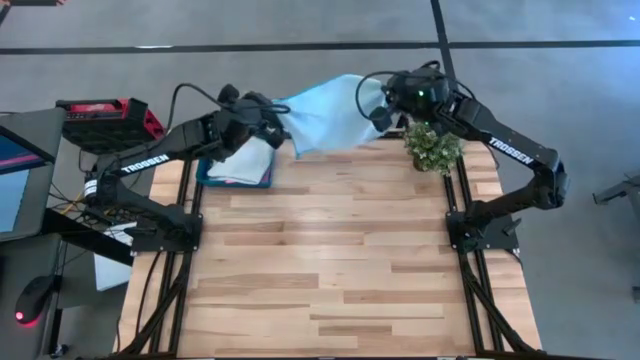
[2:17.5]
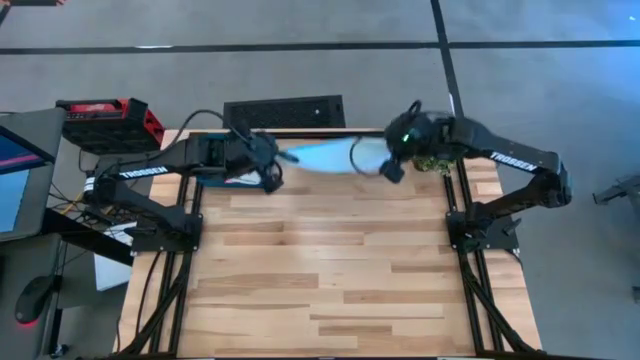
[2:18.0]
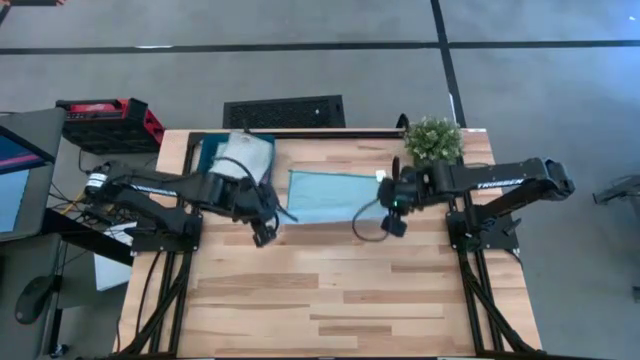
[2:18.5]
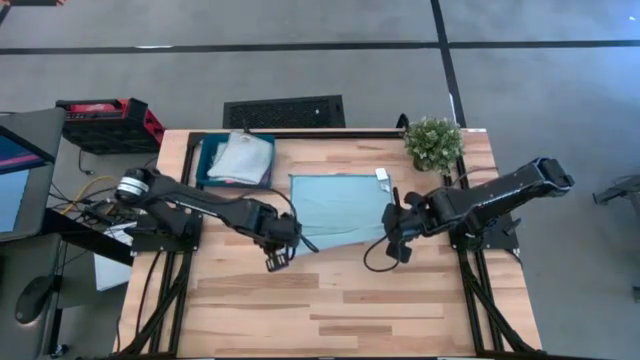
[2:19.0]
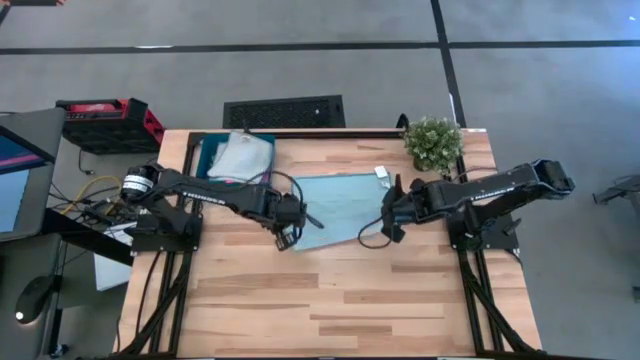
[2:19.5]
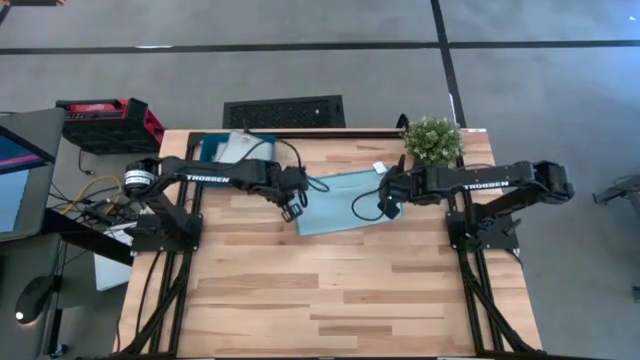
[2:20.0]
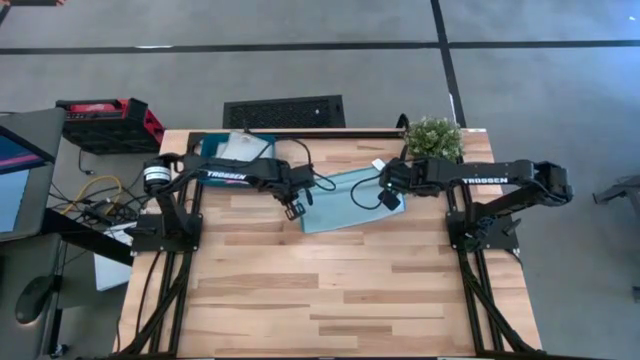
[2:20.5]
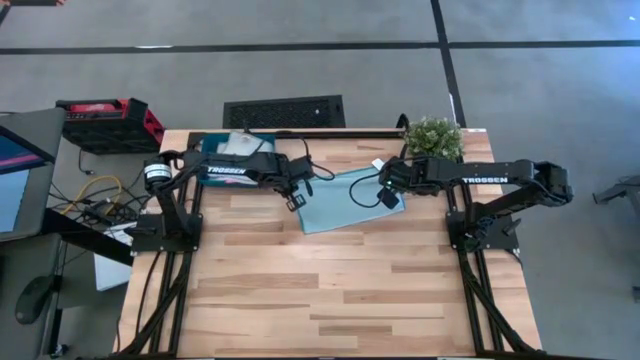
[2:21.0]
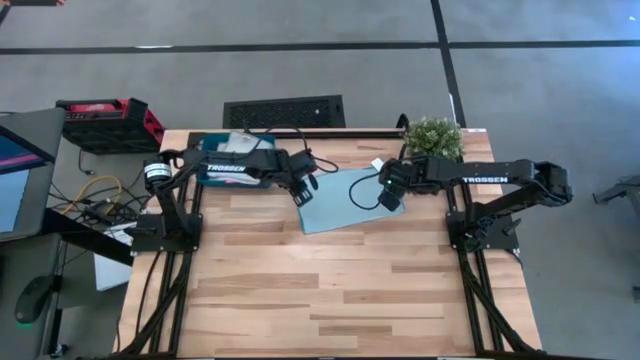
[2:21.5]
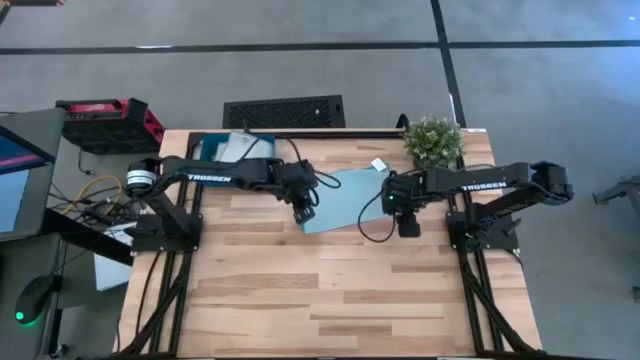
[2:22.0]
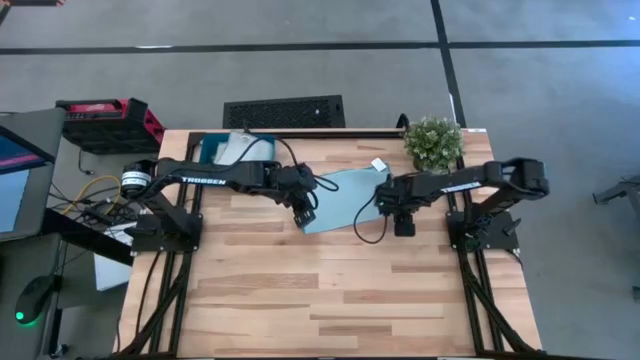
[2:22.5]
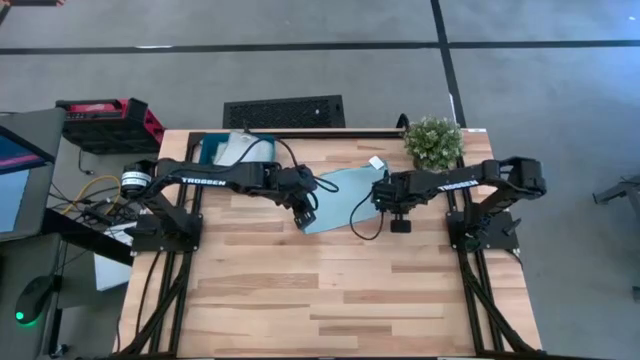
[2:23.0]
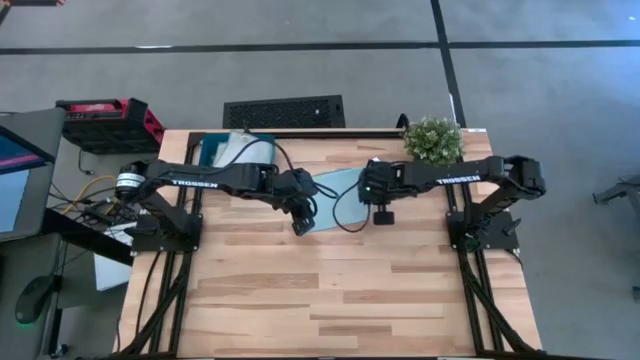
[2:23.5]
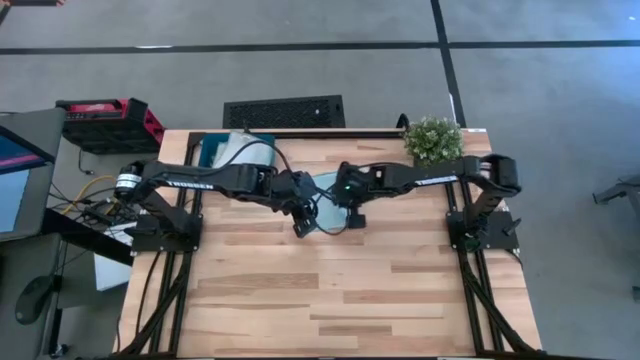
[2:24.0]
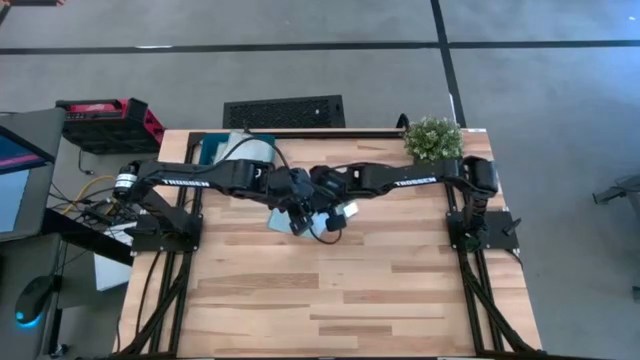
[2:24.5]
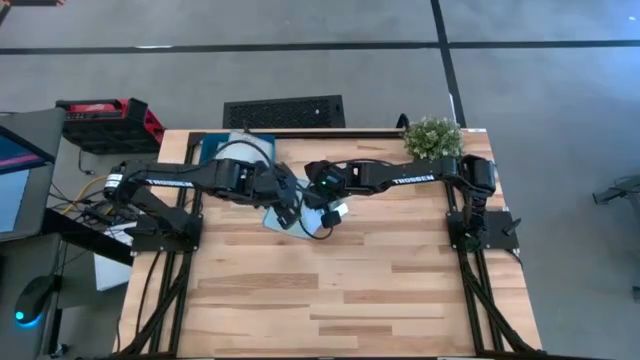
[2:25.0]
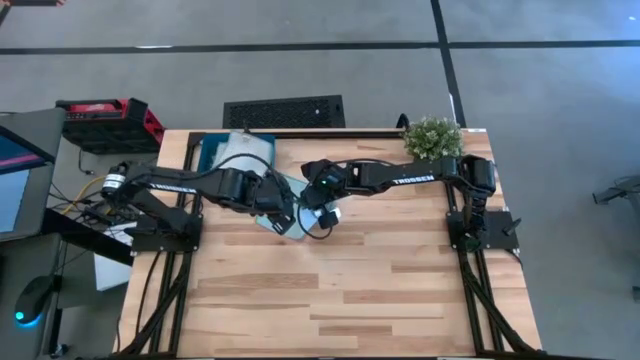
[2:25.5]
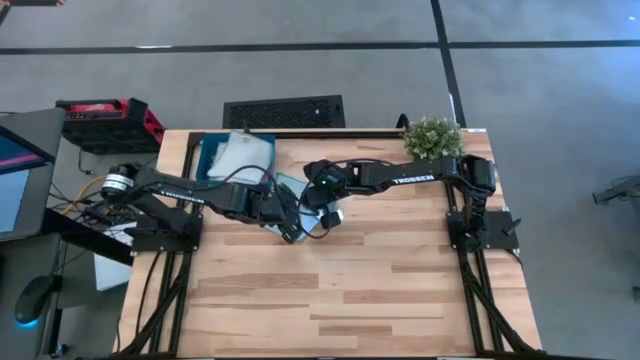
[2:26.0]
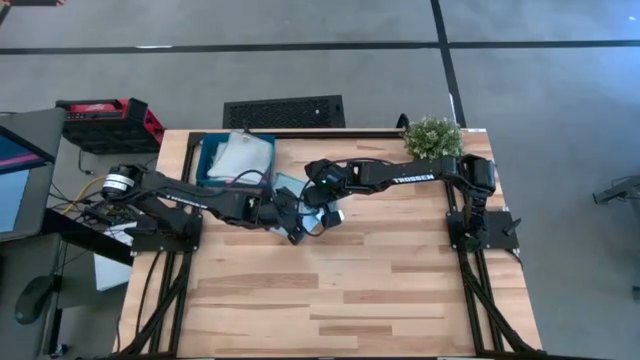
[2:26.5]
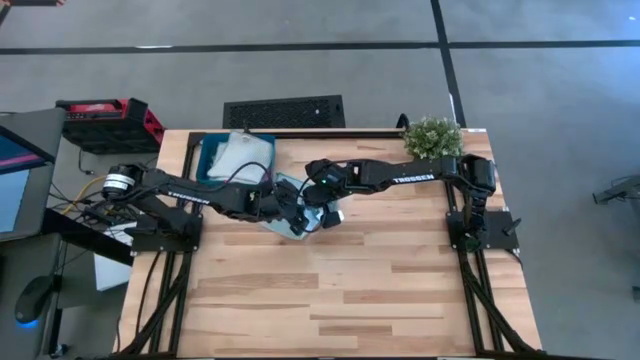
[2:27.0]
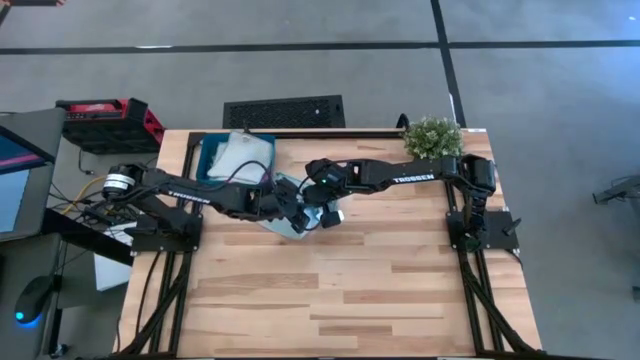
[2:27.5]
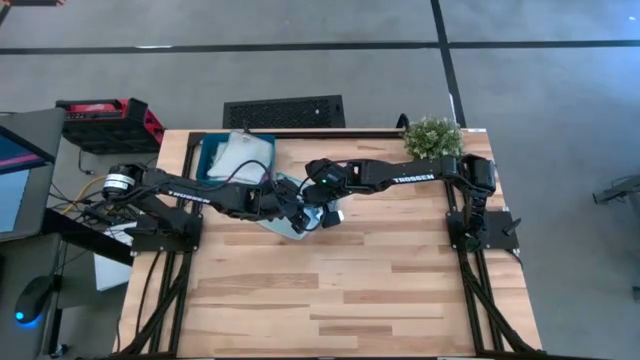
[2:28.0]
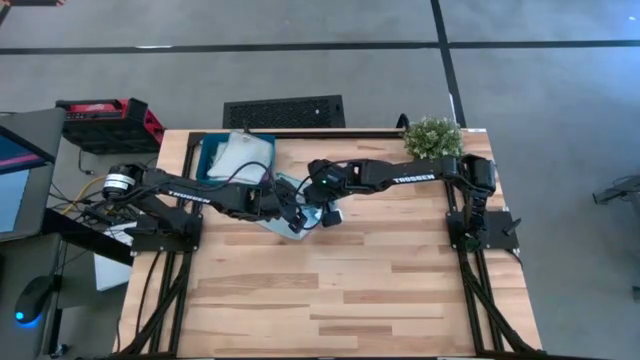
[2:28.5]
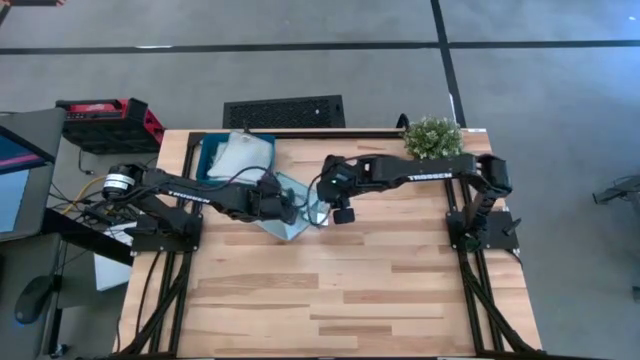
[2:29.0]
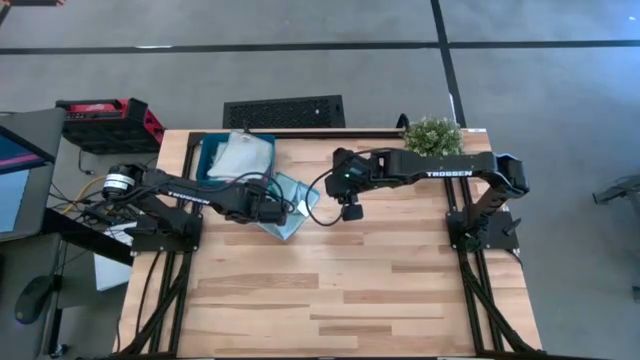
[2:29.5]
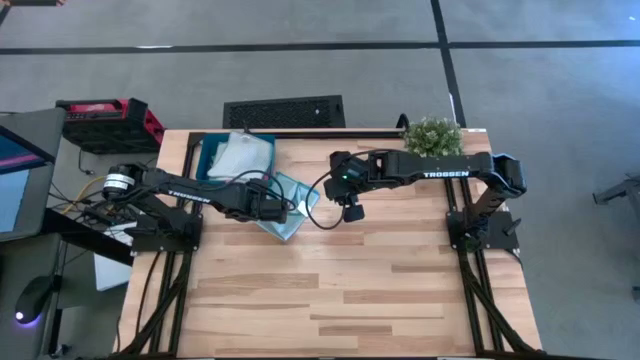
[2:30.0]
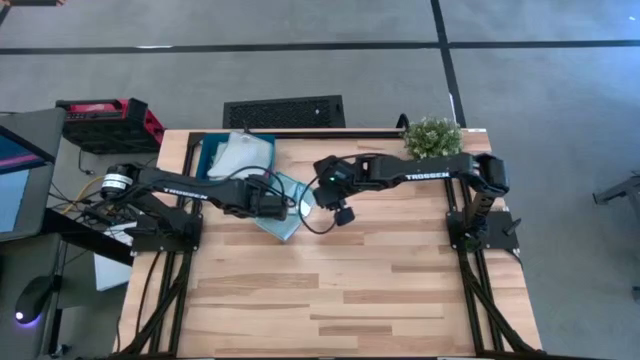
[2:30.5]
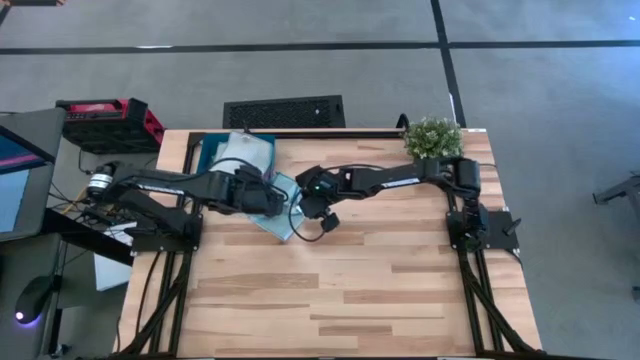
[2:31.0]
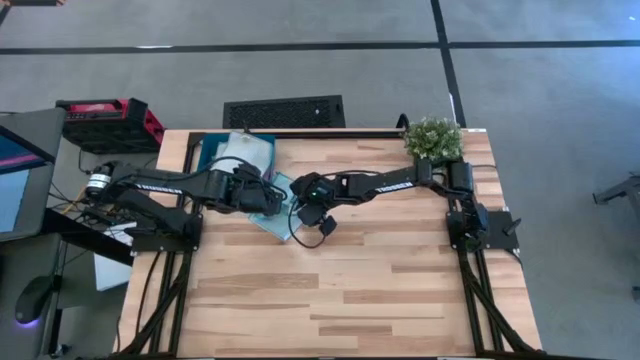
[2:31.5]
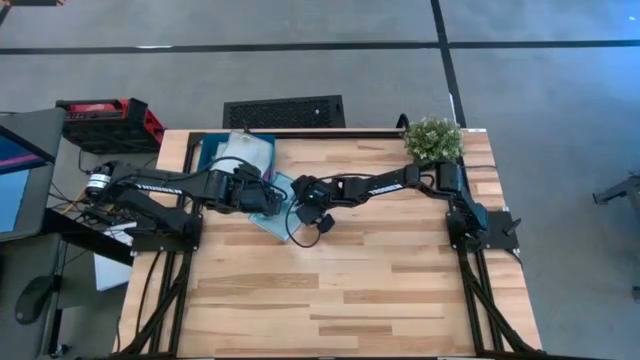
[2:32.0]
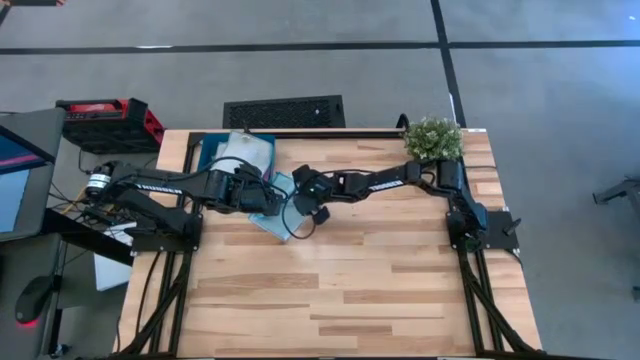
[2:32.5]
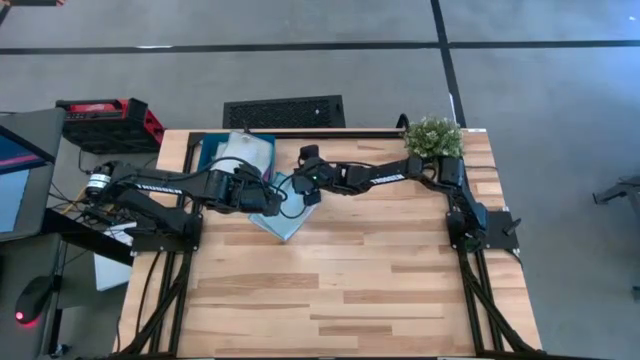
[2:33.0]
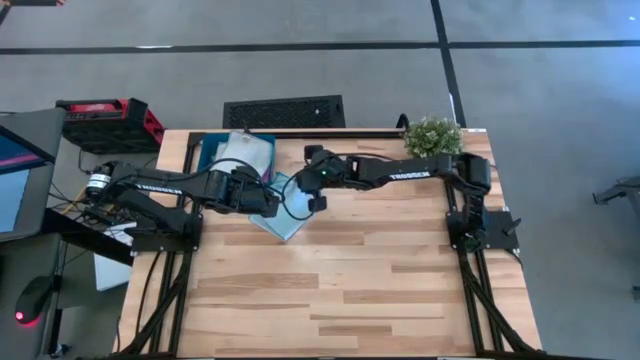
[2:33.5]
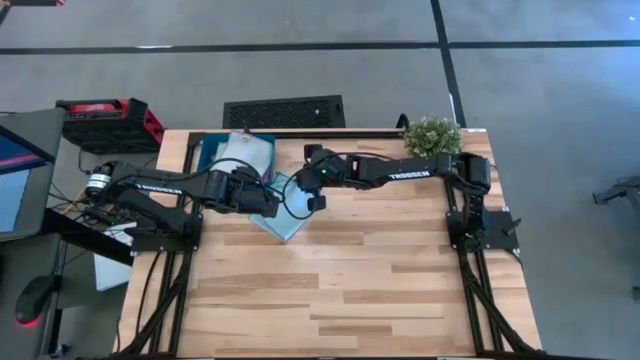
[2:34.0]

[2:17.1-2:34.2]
Task: Fold microfiber towels
Fold the blue cloth

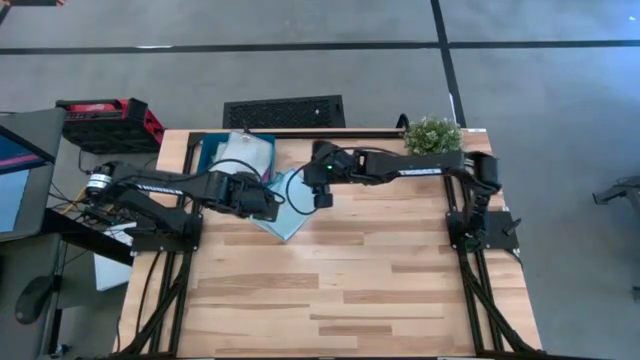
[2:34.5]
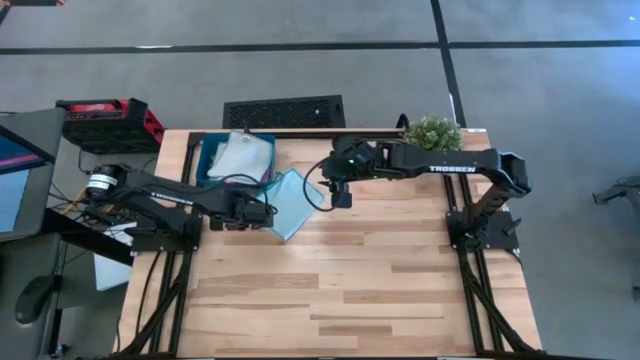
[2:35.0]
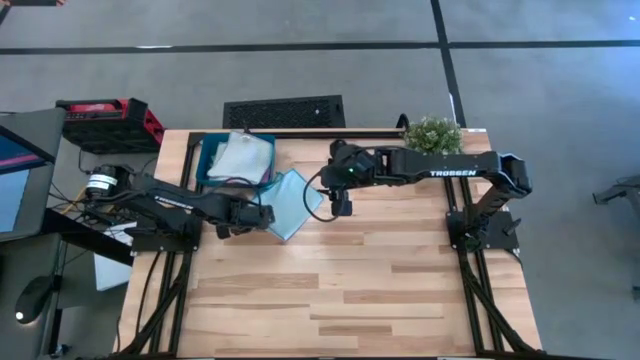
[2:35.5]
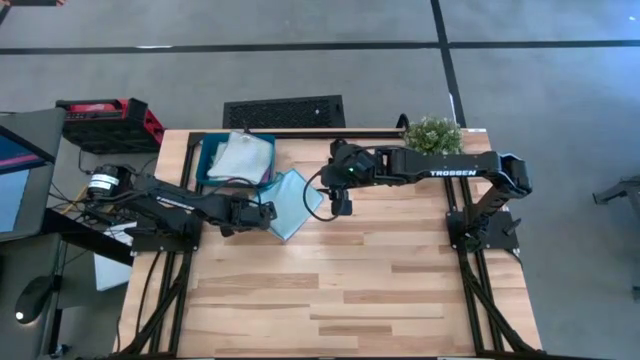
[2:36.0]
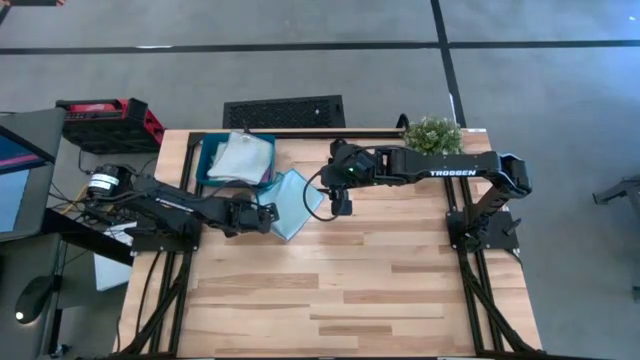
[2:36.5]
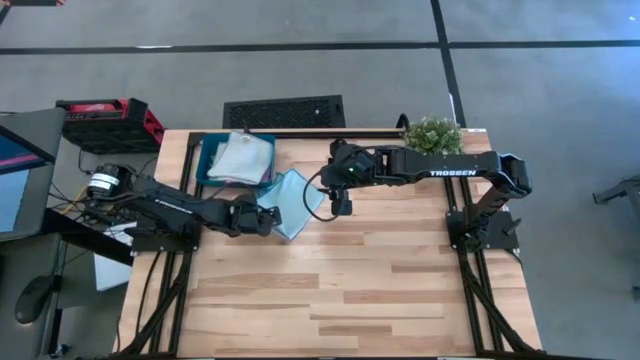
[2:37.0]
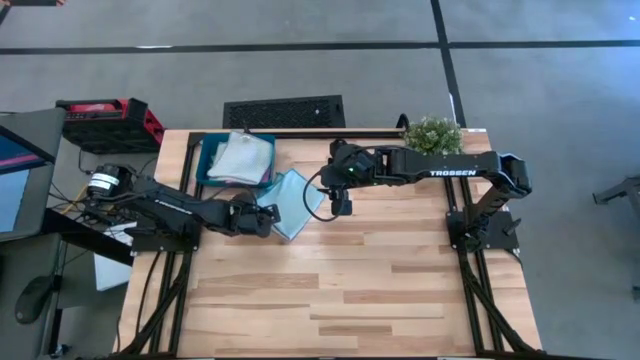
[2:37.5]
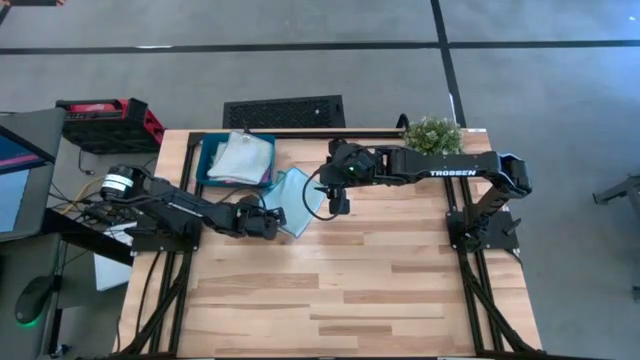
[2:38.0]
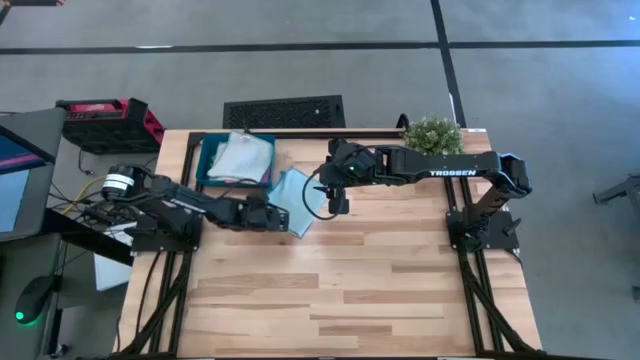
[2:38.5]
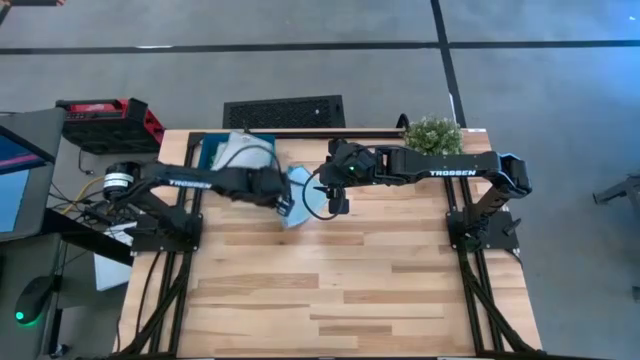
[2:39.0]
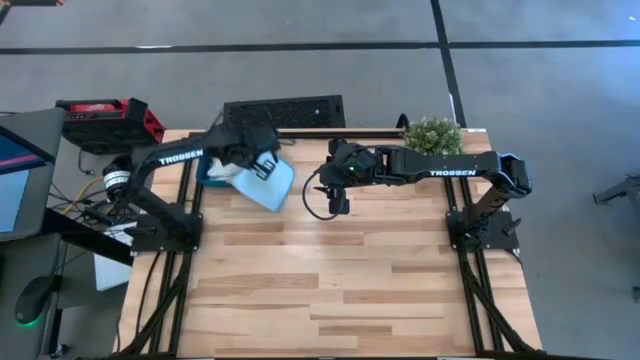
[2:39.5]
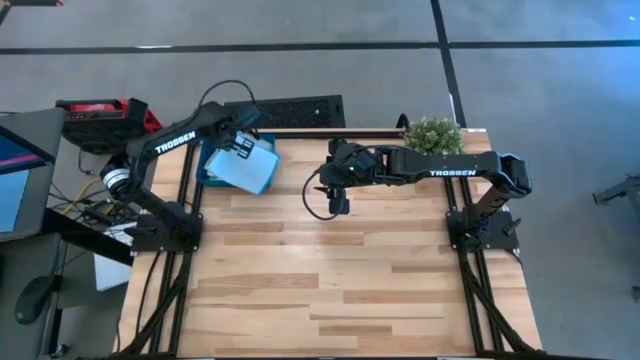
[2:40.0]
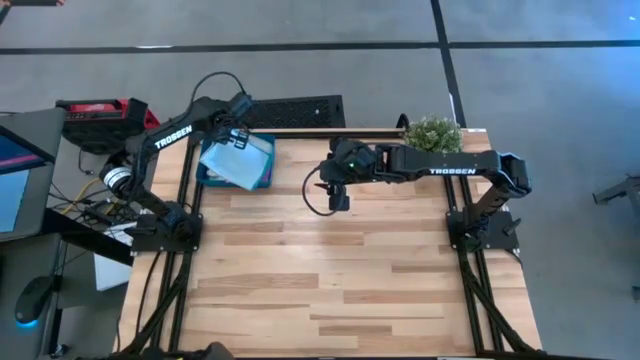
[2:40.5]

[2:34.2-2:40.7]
Put the blue cloth into the blue bin
